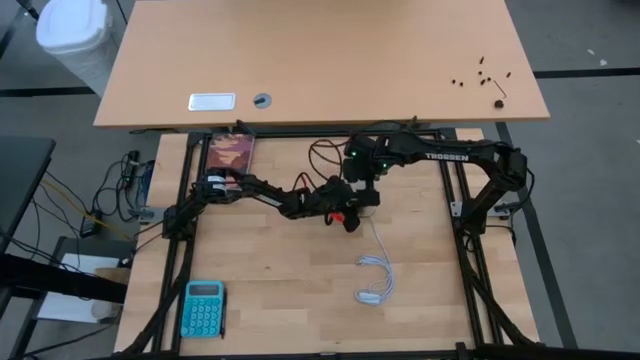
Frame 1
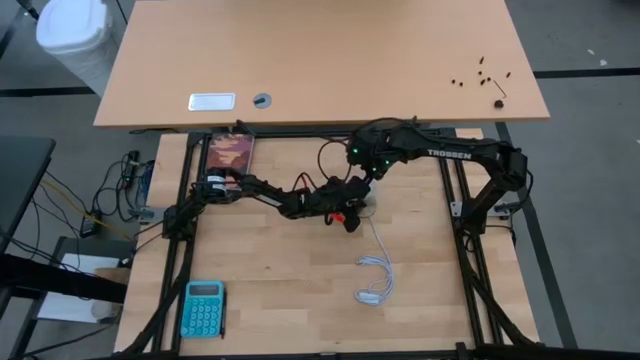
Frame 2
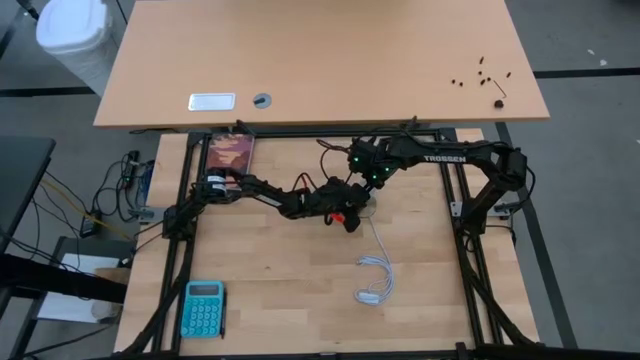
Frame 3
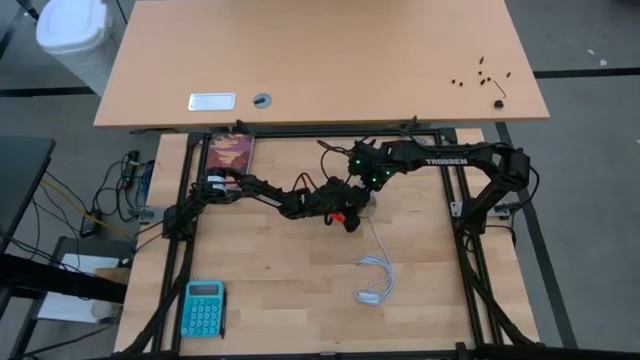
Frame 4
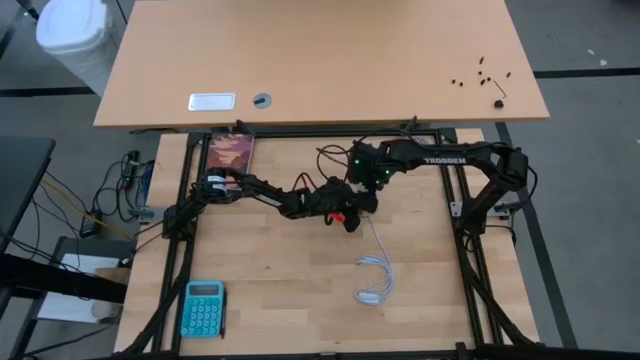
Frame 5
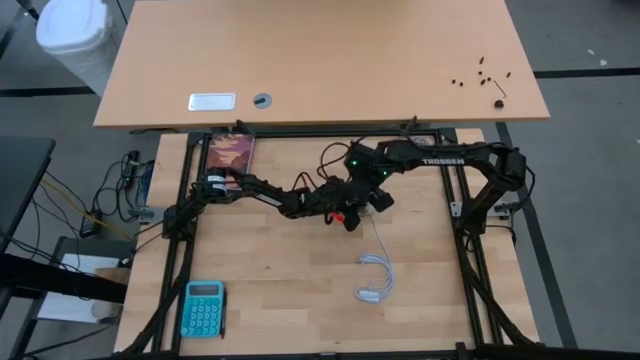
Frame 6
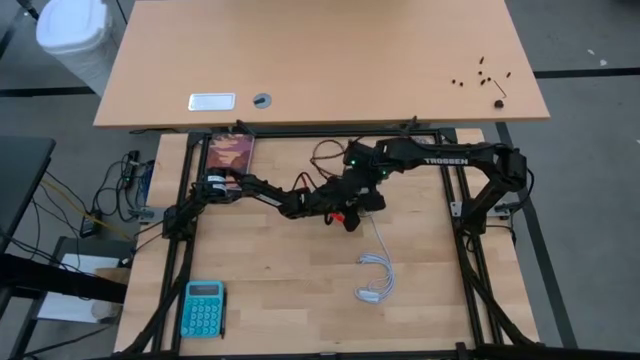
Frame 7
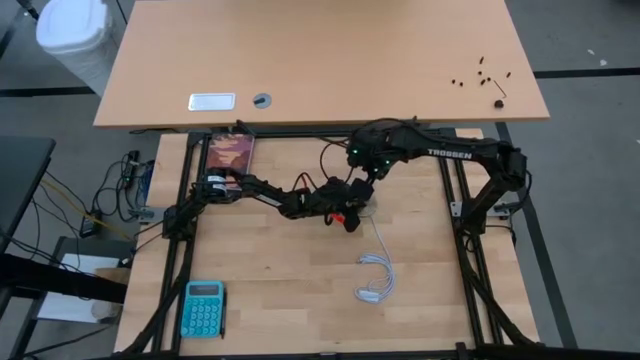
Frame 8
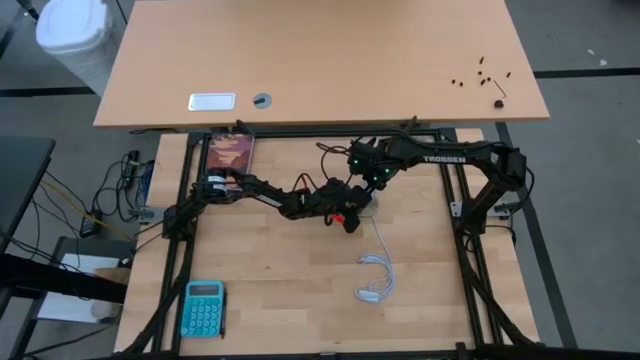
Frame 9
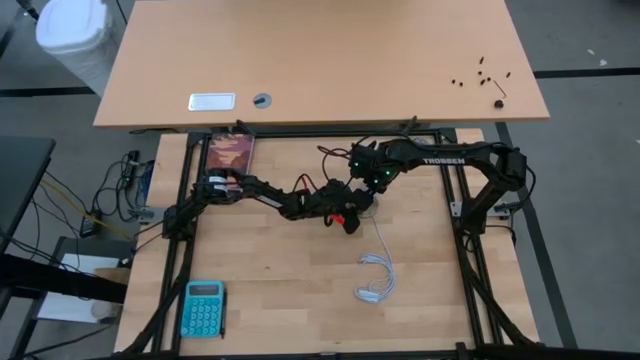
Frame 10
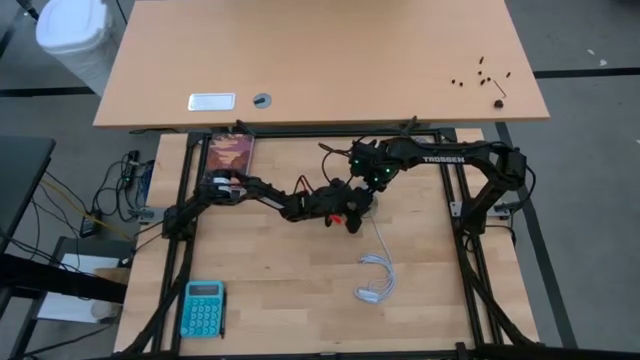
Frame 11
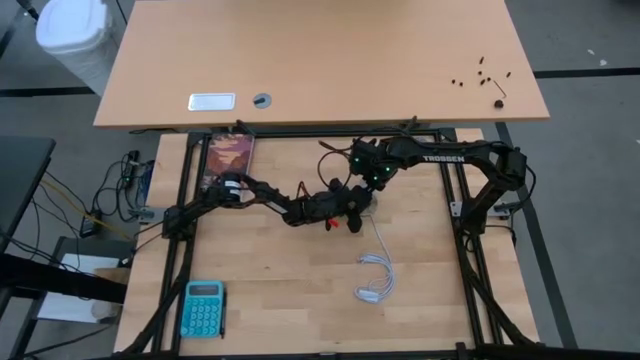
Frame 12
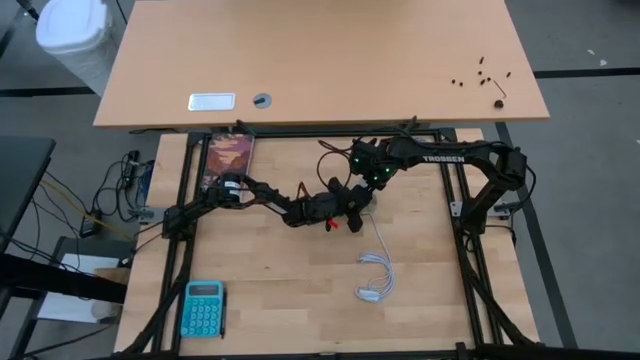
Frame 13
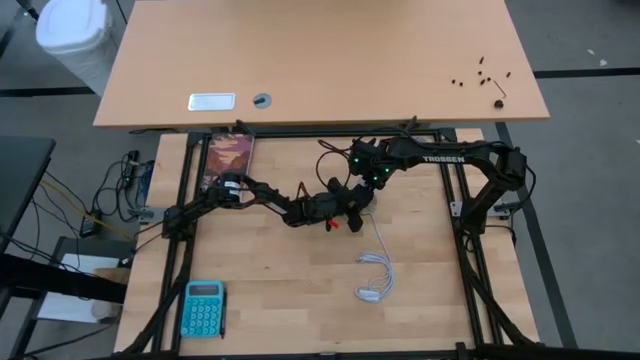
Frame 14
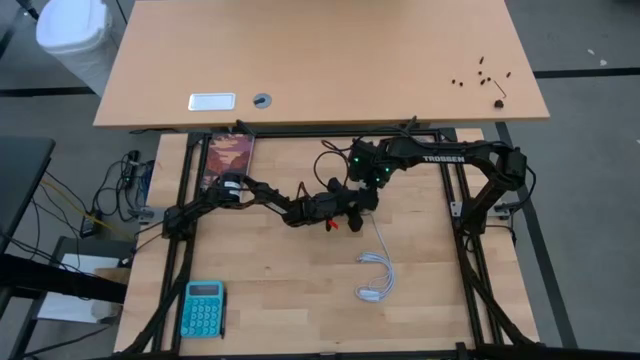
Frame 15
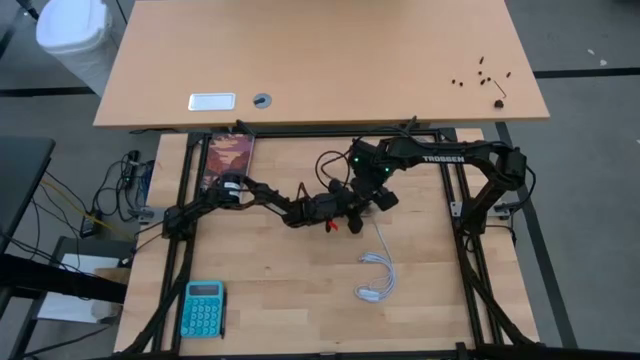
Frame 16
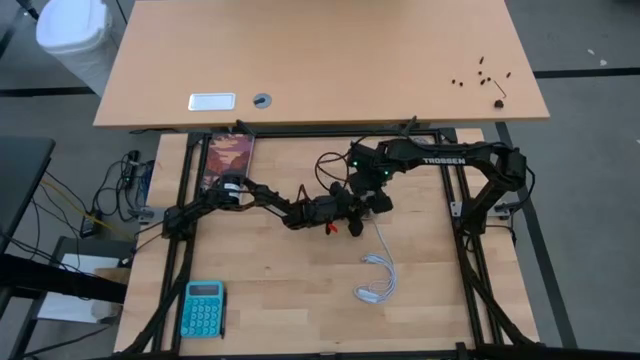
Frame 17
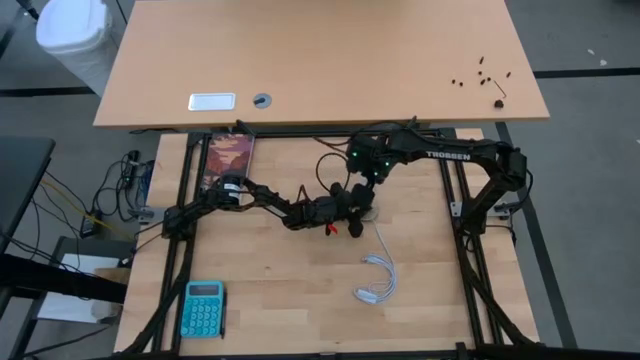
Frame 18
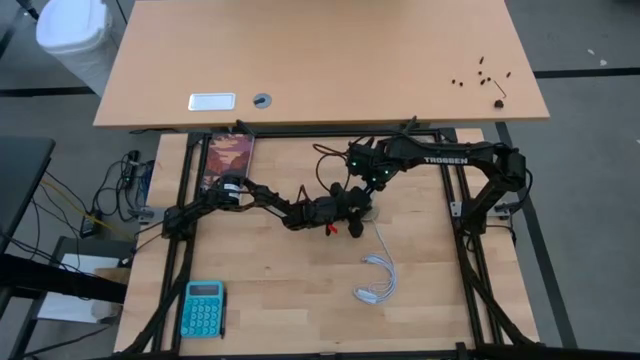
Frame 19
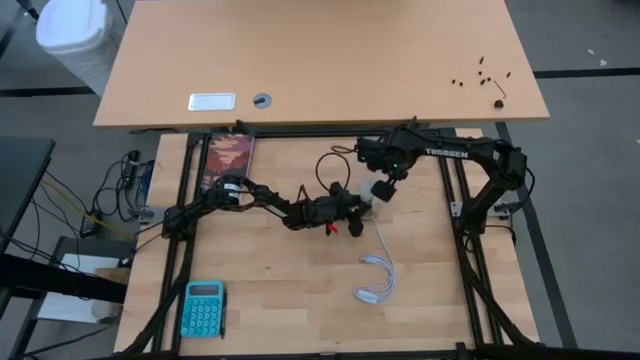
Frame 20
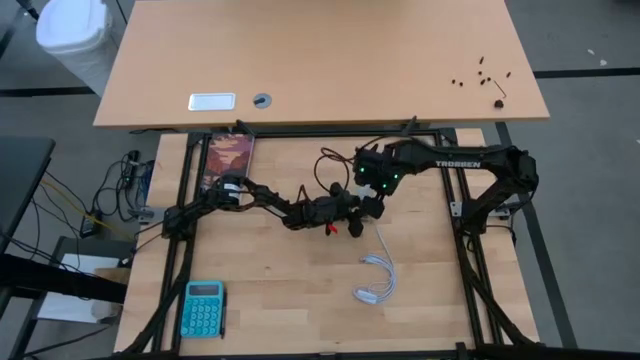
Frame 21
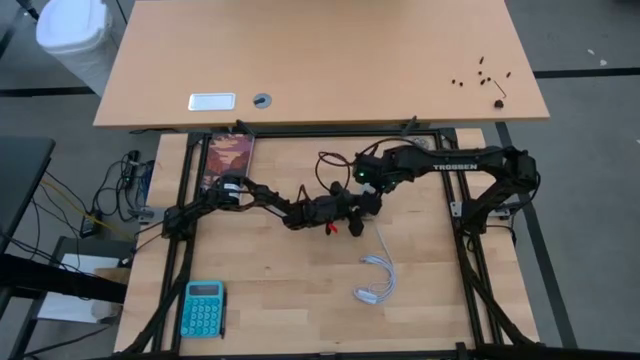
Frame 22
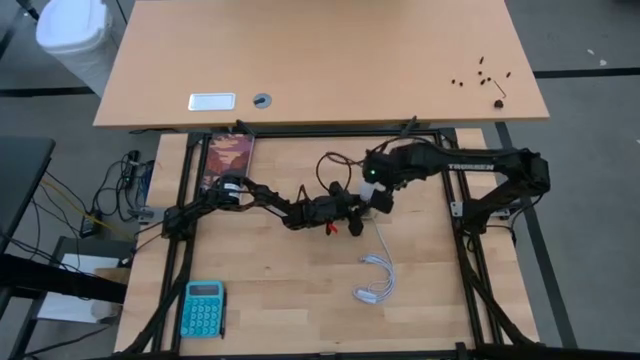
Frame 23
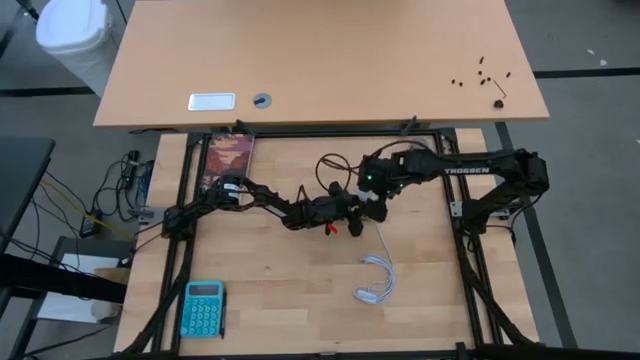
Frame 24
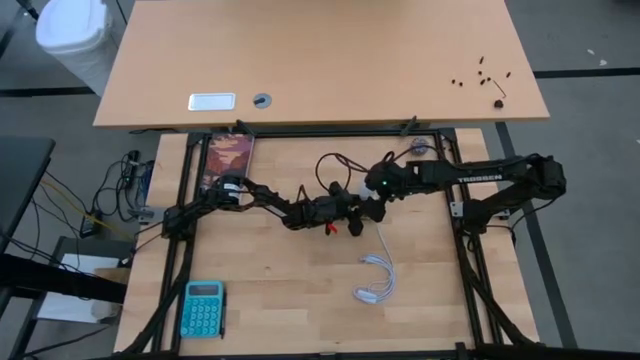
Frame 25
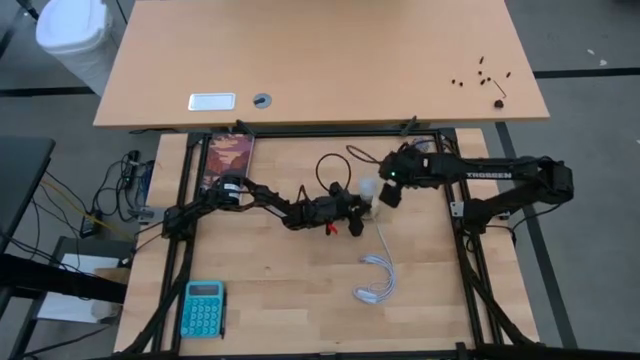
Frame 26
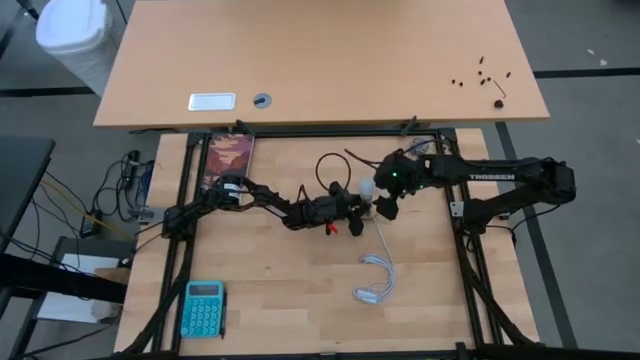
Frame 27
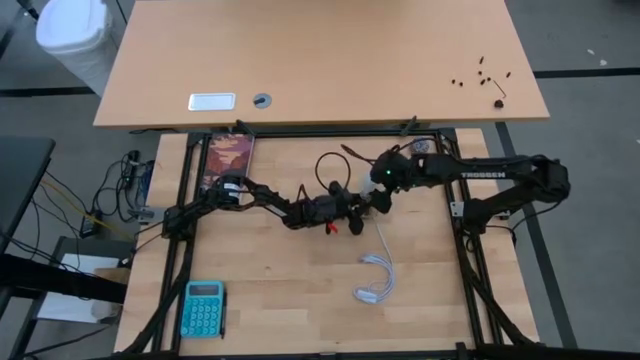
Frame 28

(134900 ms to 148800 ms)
Task: Screw lightbulb
Remove the white lightbulb from the lamp

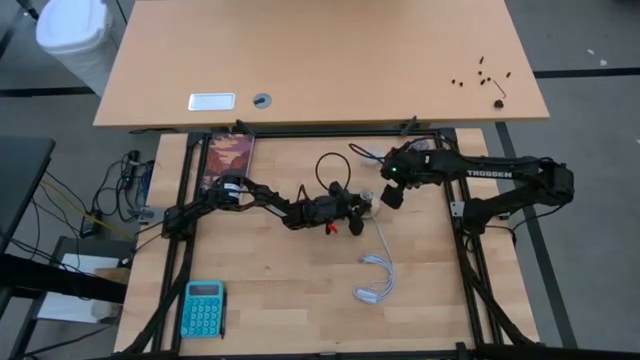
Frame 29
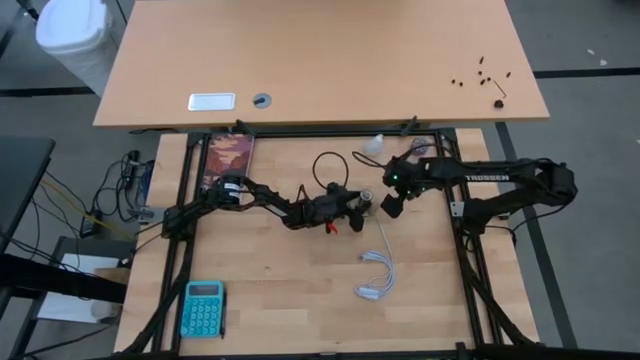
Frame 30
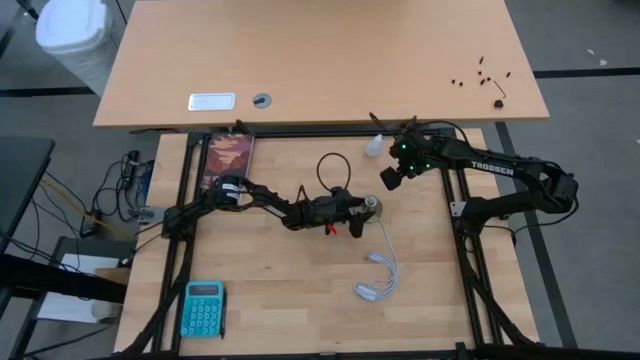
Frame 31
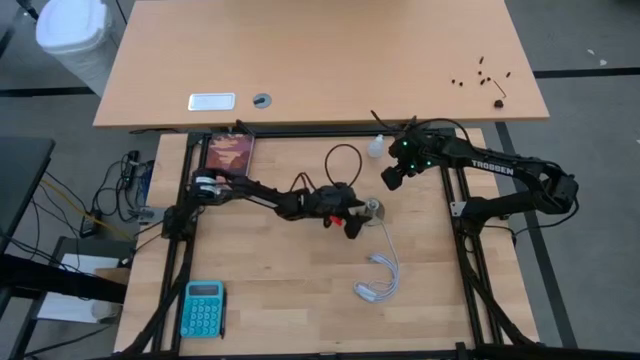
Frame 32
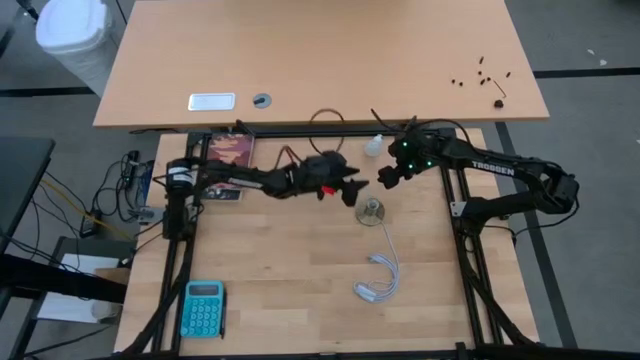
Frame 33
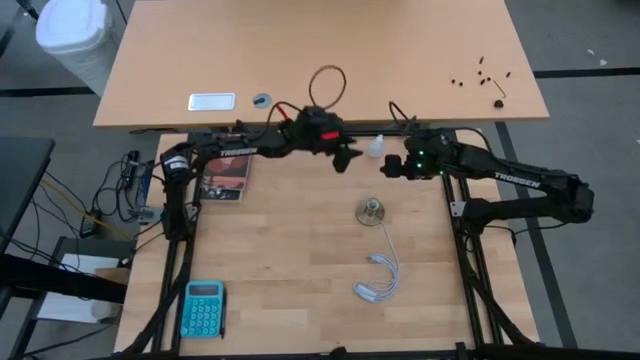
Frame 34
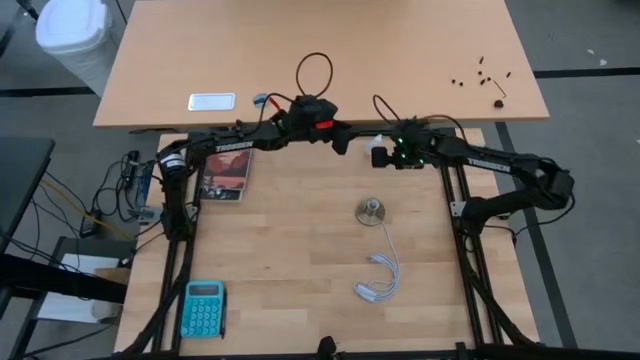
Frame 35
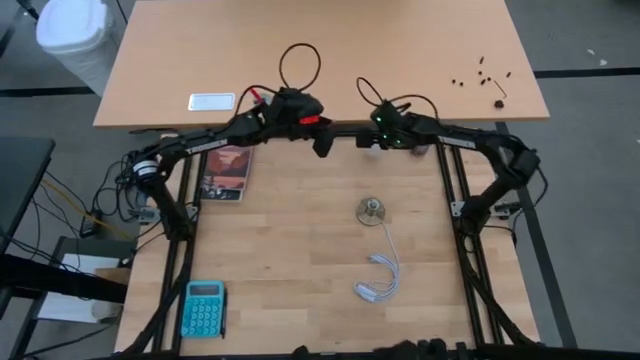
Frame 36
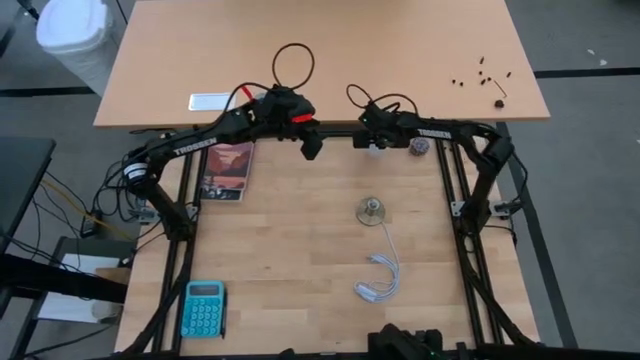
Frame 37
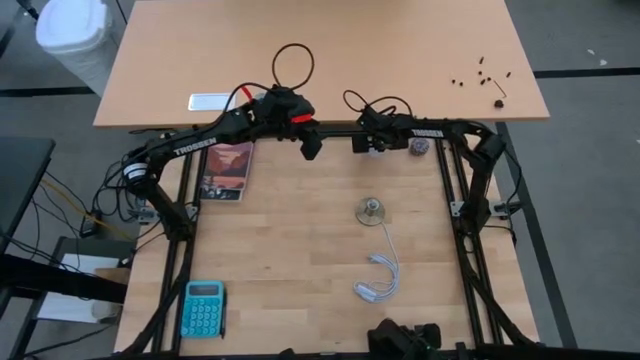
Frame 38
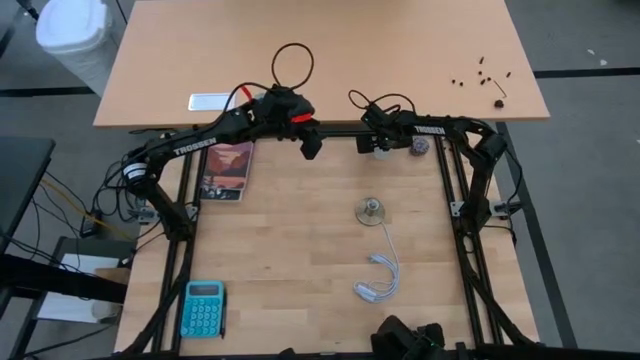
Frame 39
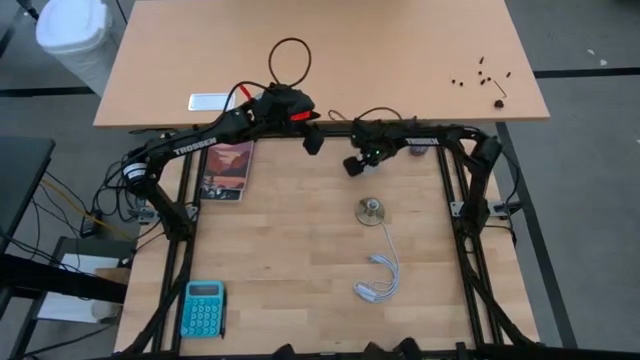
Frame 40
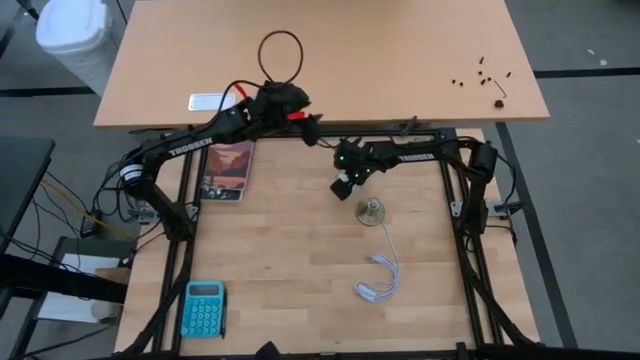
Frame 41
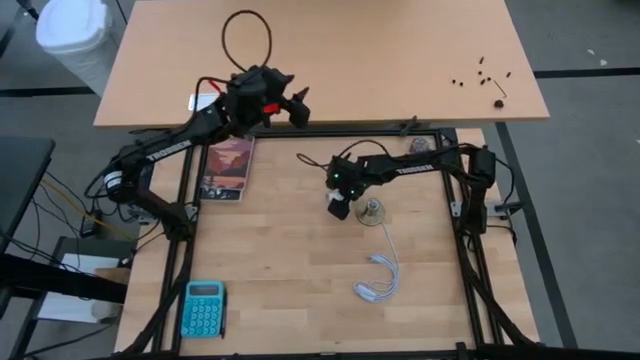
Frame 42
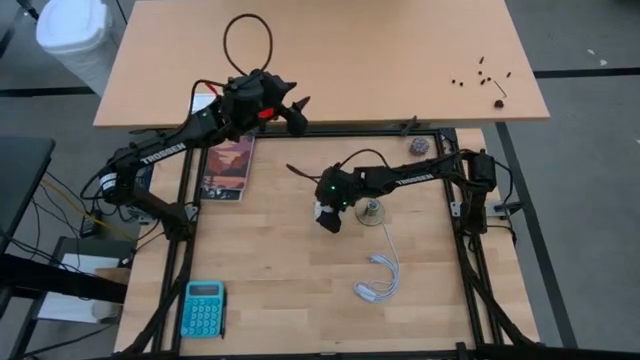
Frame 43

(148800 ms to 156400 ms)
Move the white lightbulb to the left side of the lamp
